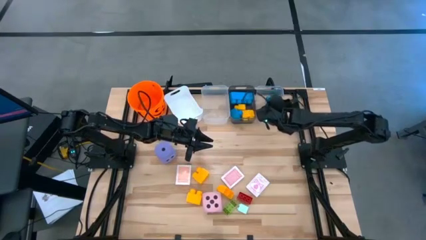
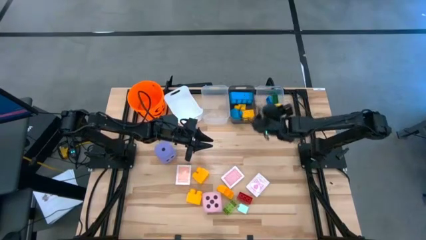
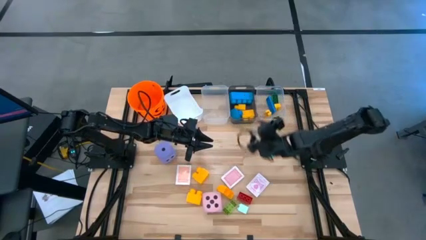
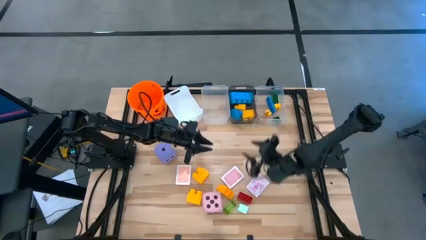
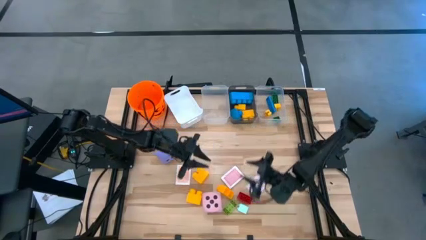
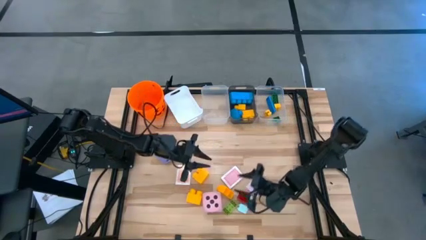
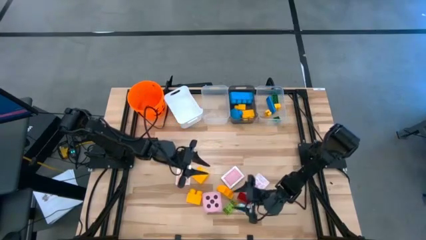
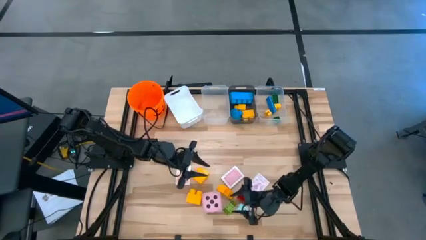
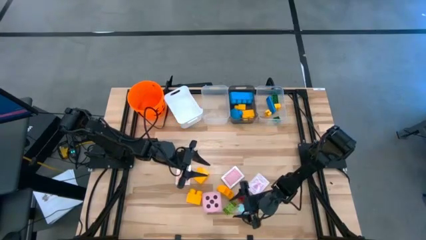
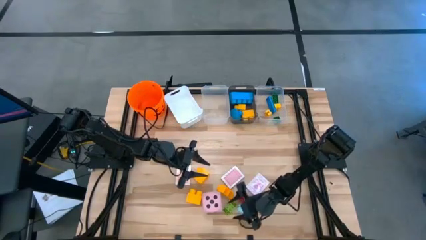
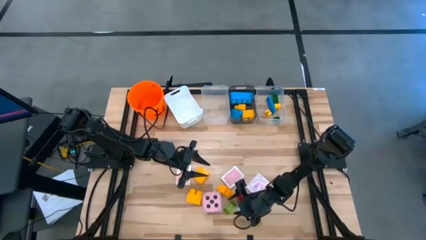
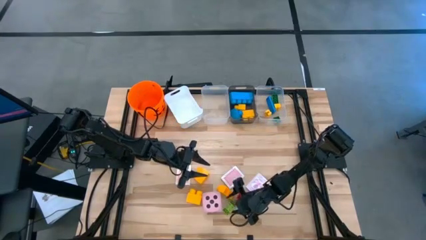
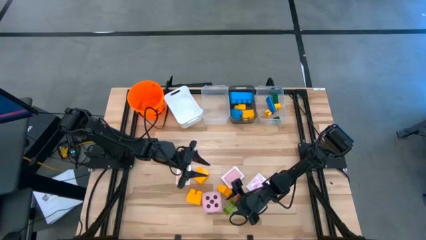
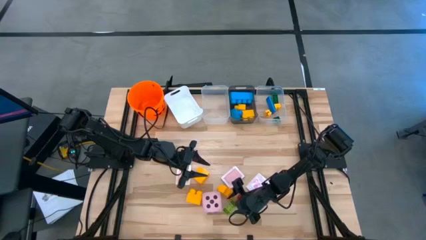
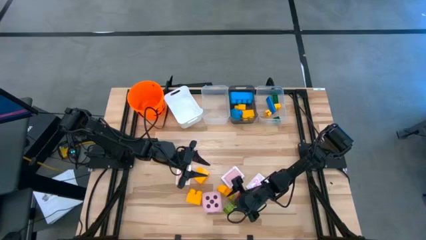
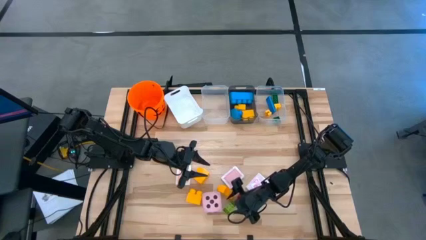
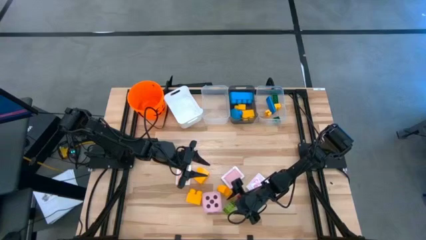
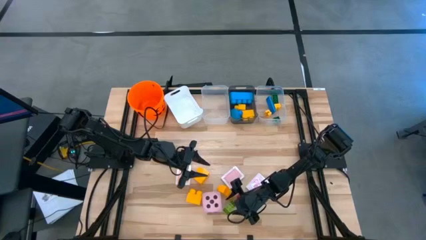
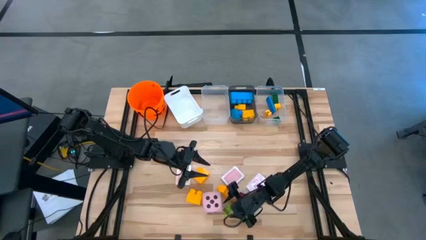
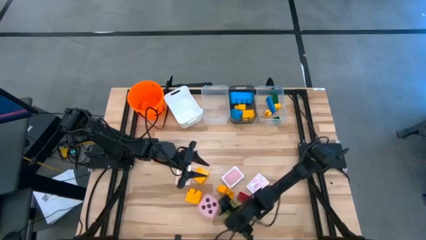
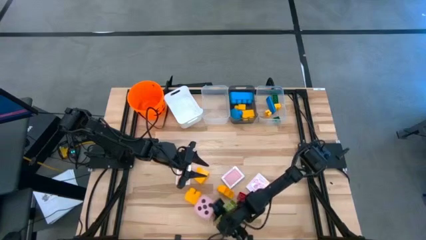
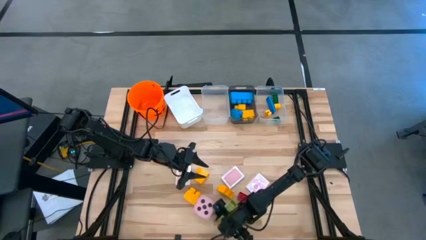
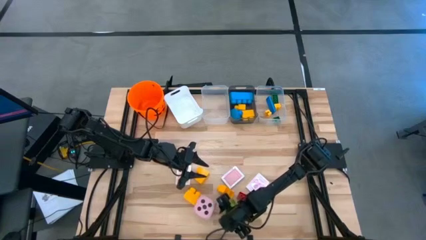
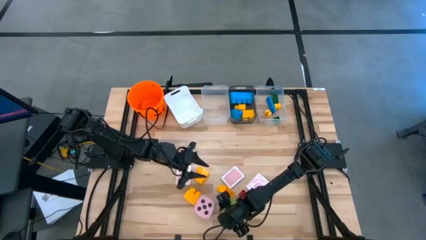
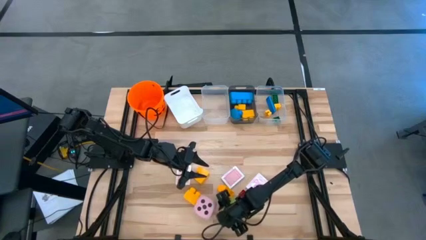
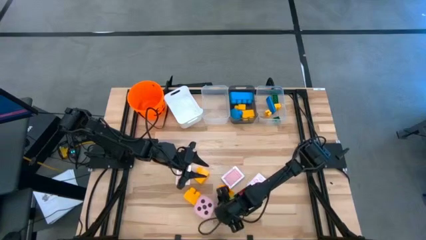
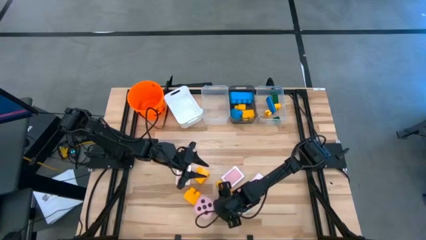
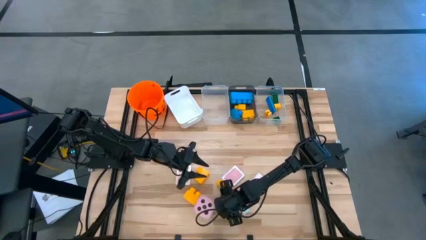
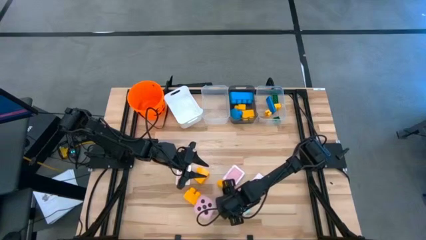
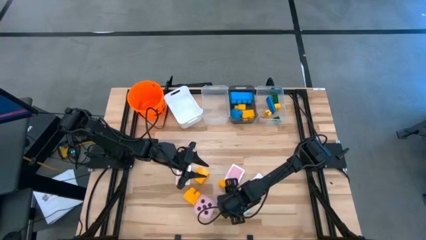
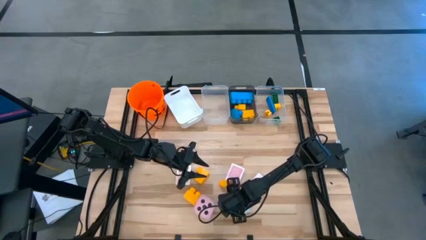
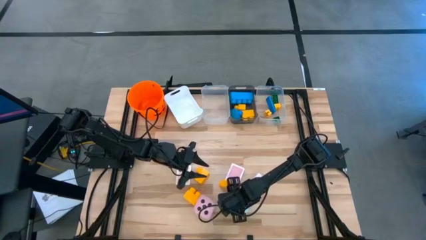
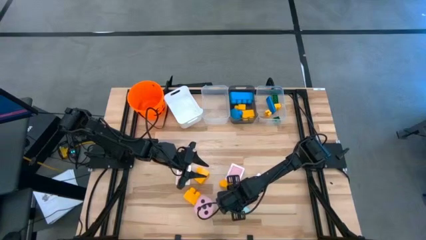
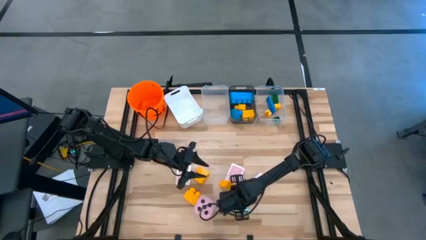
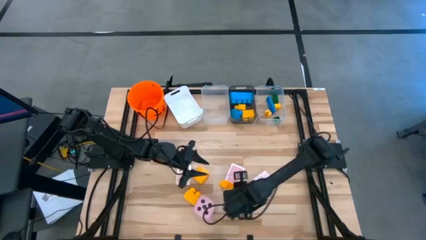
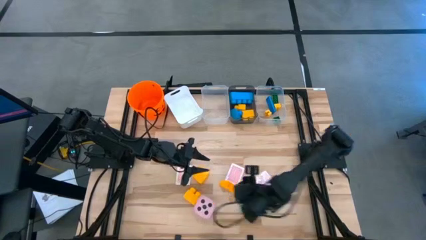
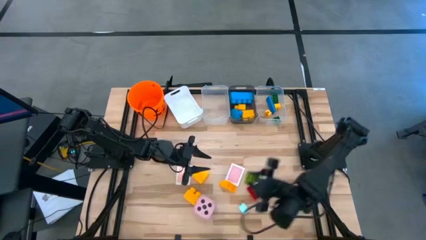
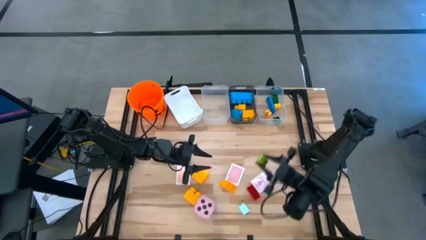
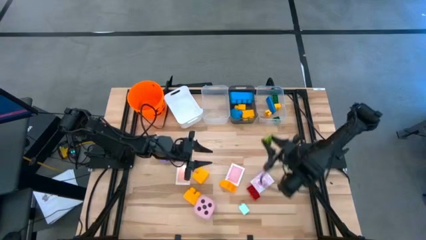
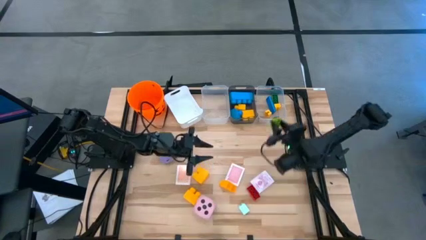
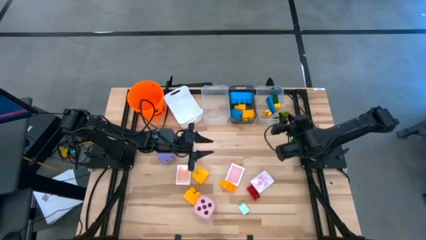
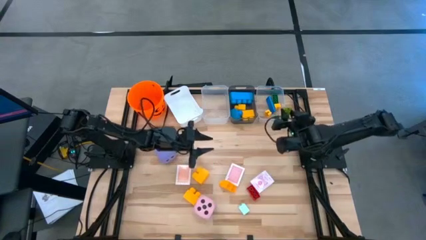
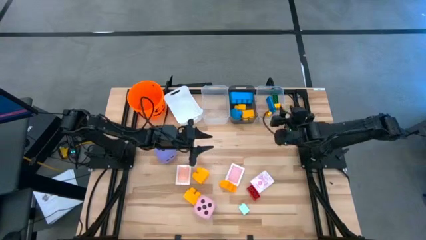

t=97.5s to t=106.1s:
Task: Pick & Place Toys
Put the small light green game piece into the right transparent bin

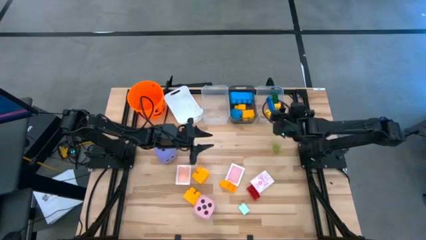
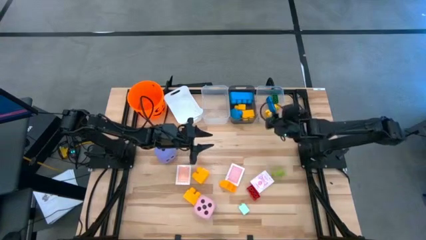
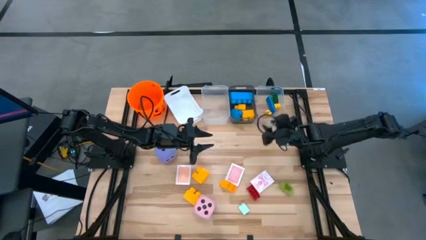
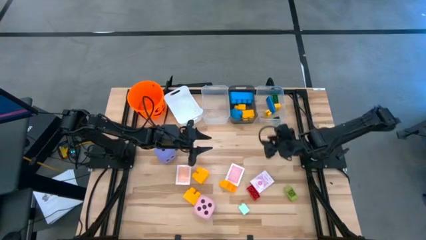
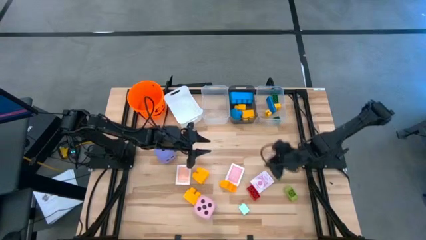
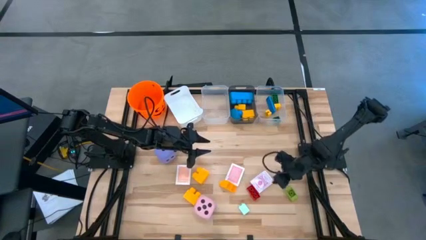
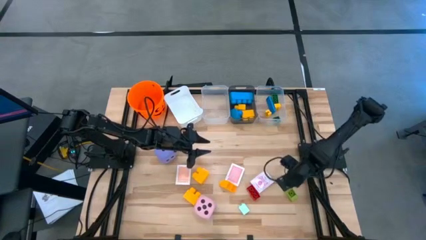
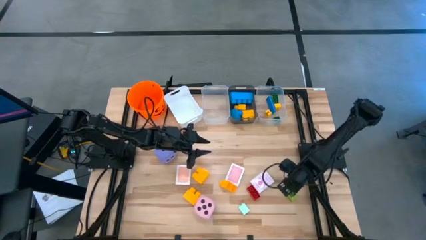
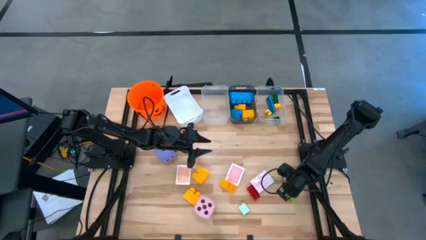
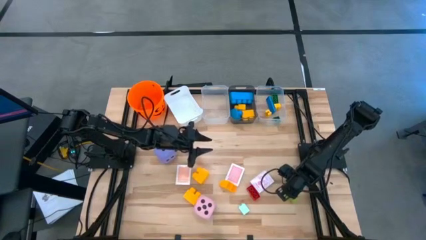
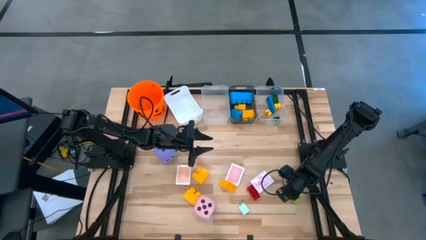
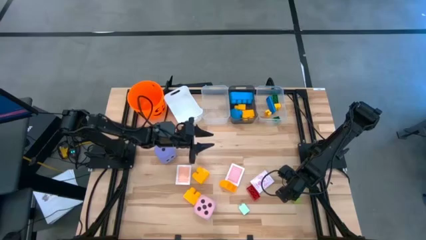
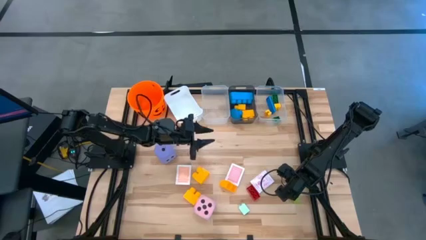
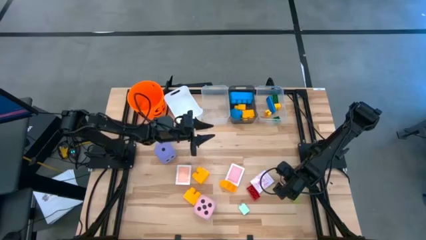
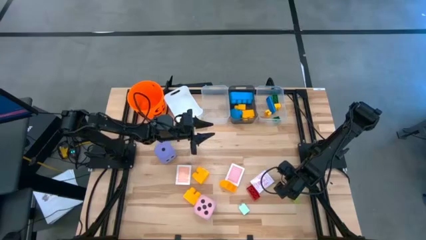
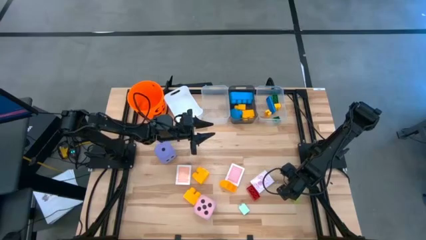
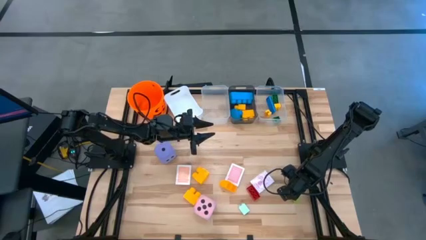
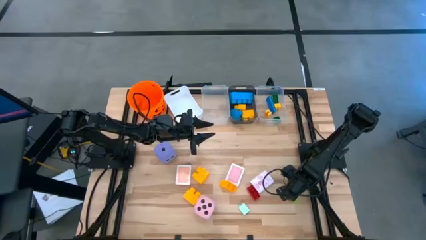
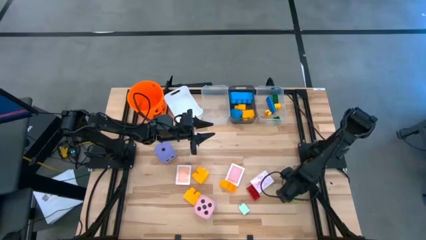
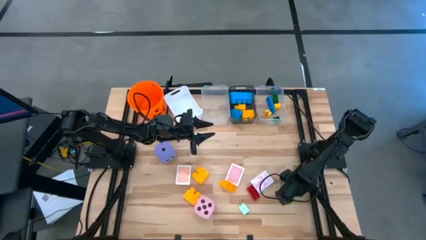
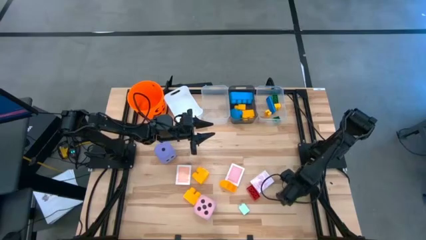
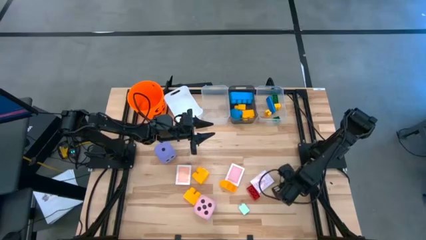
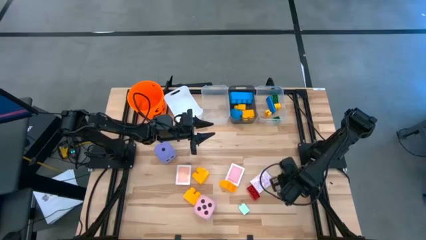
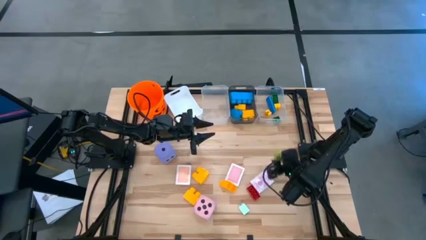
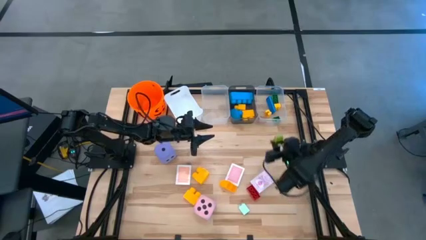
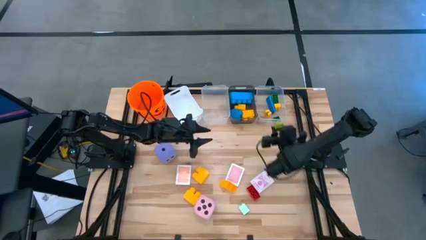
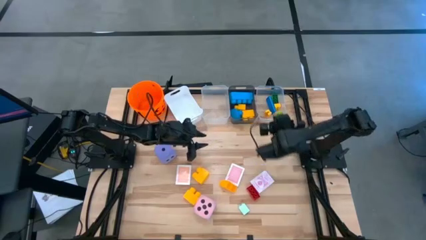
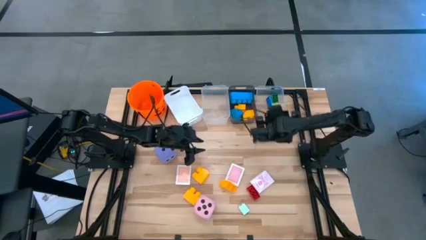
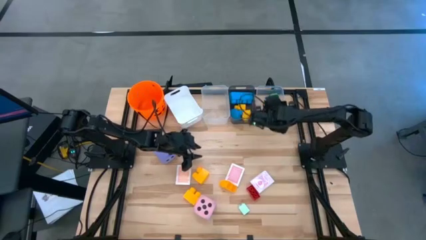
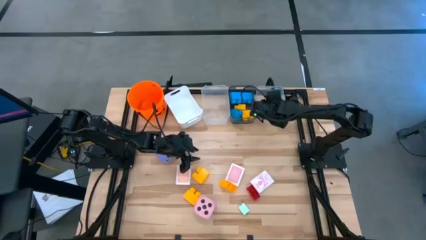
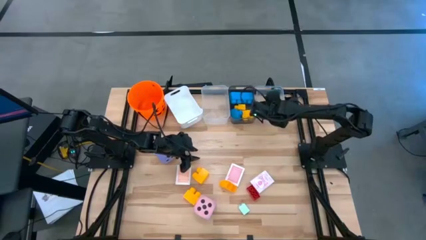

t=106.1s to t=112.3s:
Put the small light green game piece into the right transparent bin
